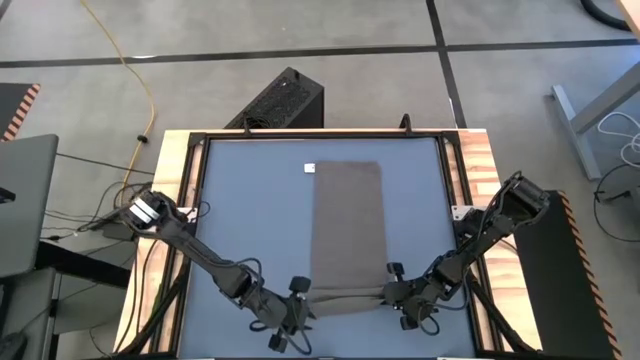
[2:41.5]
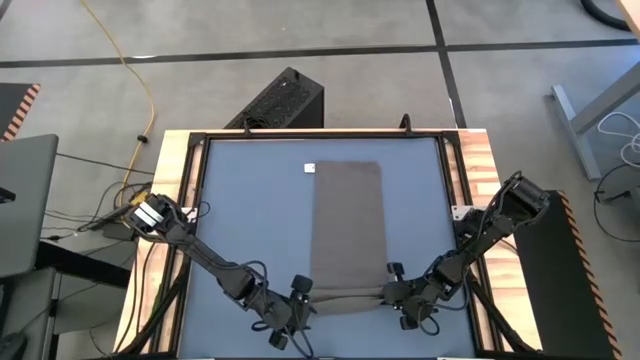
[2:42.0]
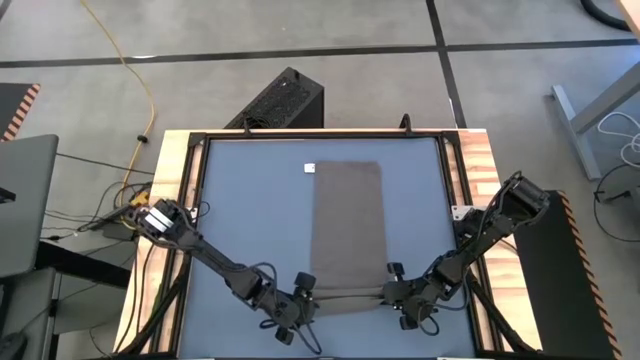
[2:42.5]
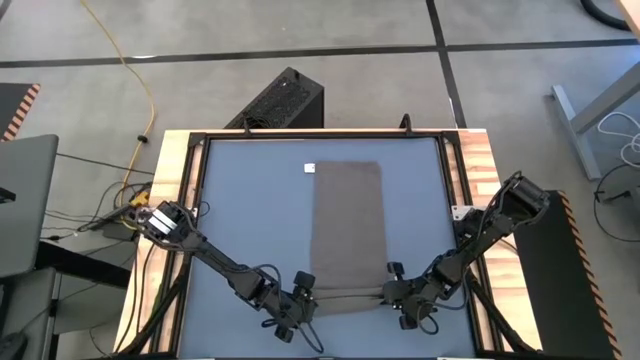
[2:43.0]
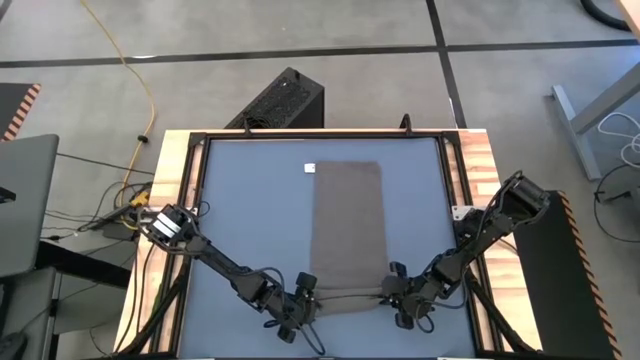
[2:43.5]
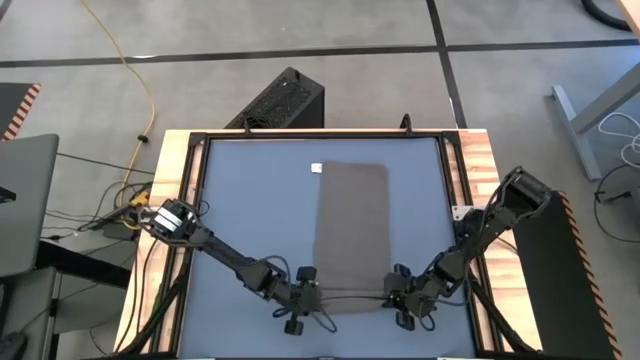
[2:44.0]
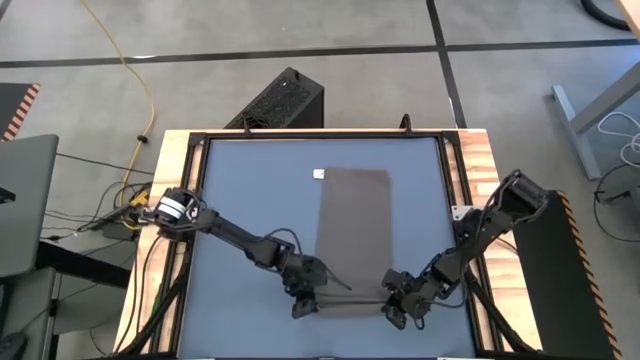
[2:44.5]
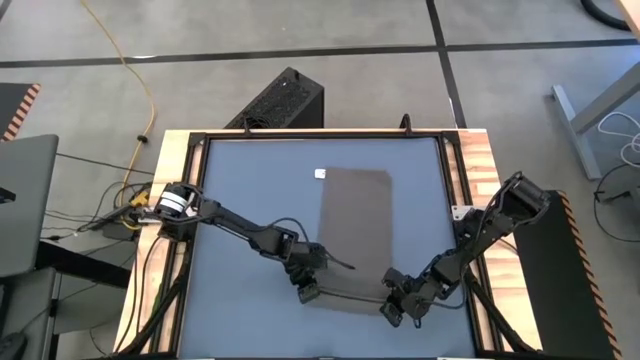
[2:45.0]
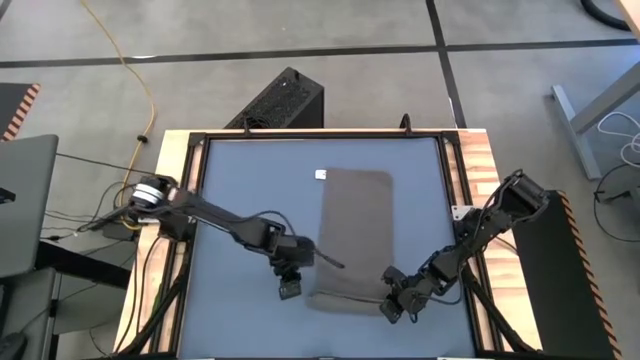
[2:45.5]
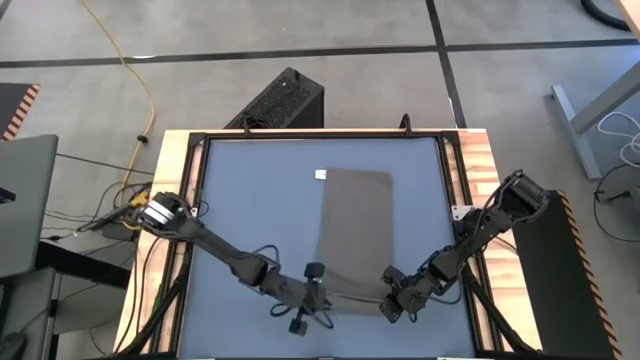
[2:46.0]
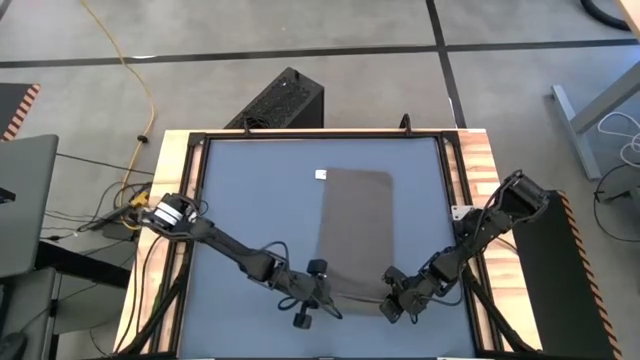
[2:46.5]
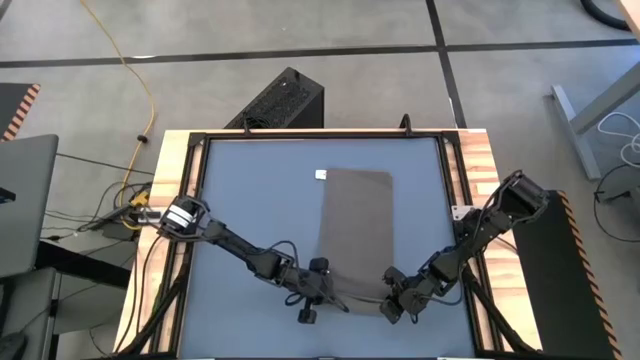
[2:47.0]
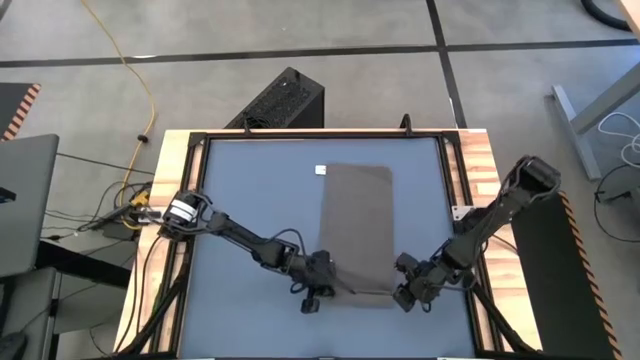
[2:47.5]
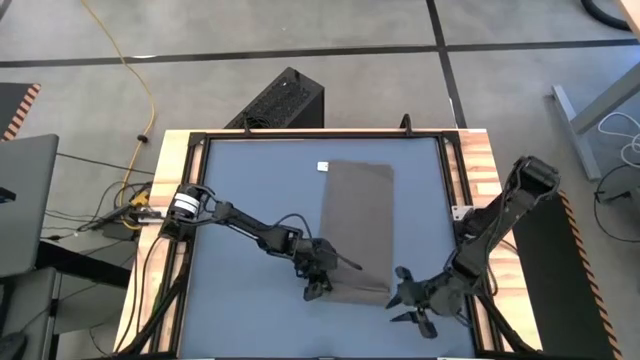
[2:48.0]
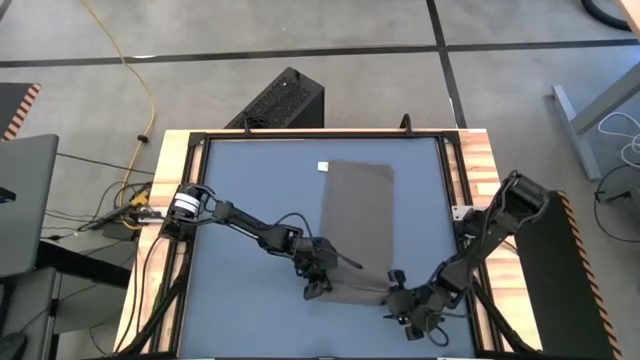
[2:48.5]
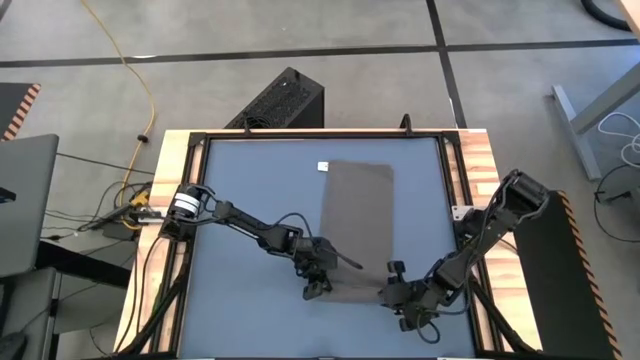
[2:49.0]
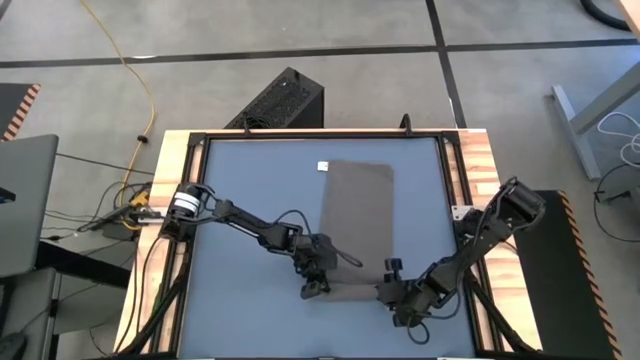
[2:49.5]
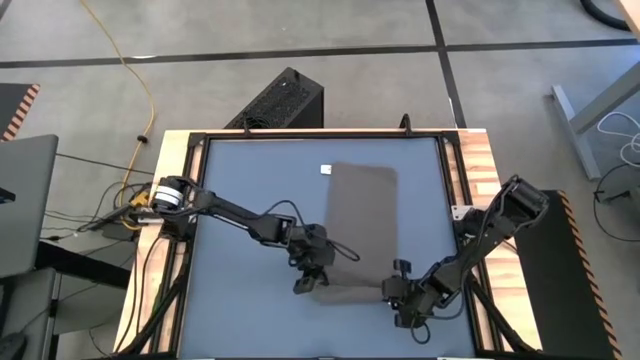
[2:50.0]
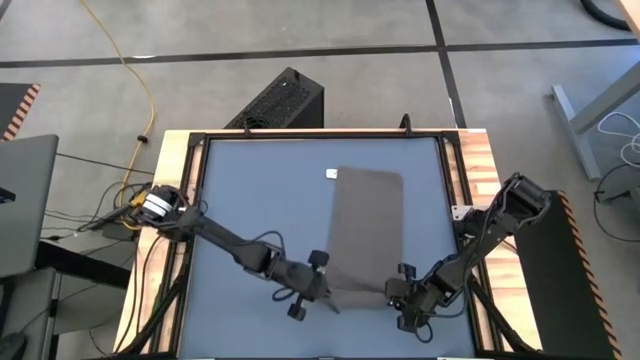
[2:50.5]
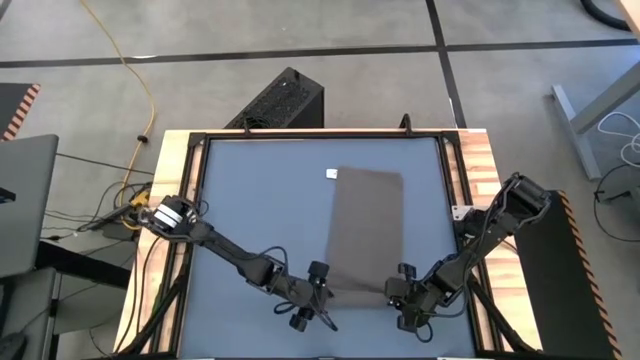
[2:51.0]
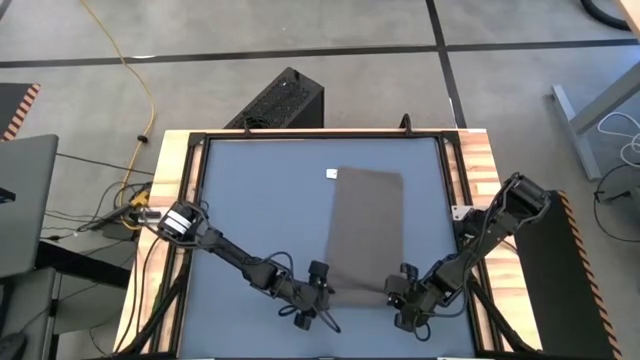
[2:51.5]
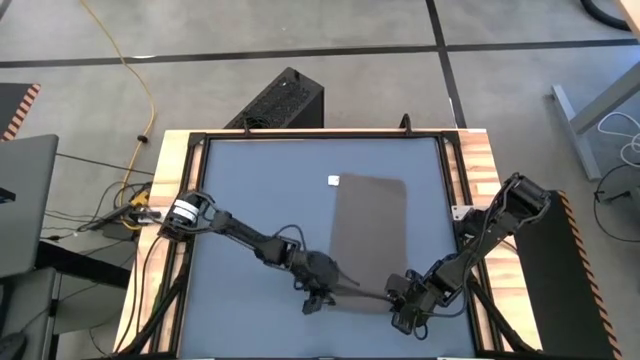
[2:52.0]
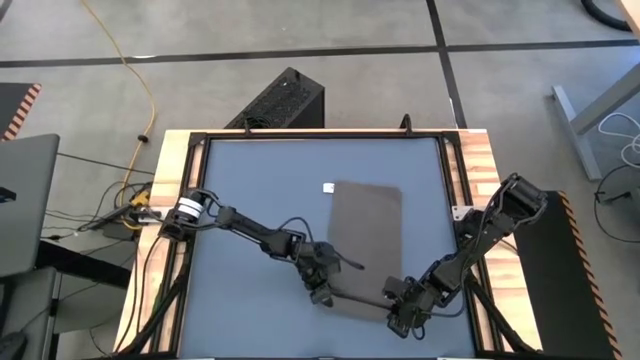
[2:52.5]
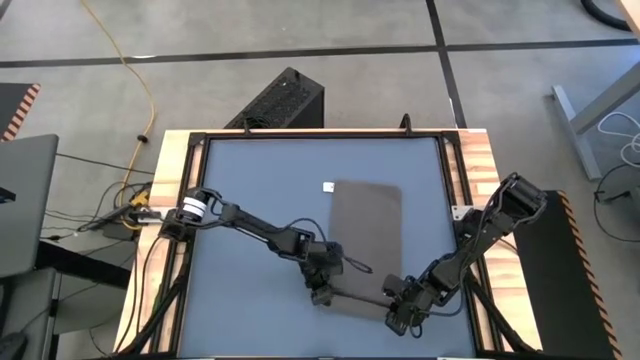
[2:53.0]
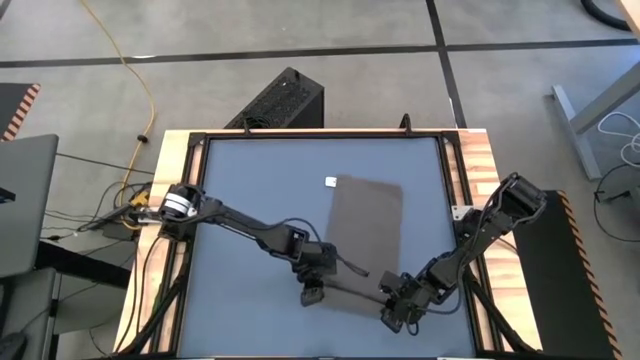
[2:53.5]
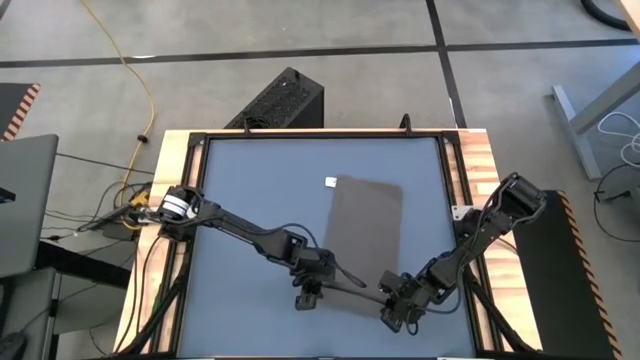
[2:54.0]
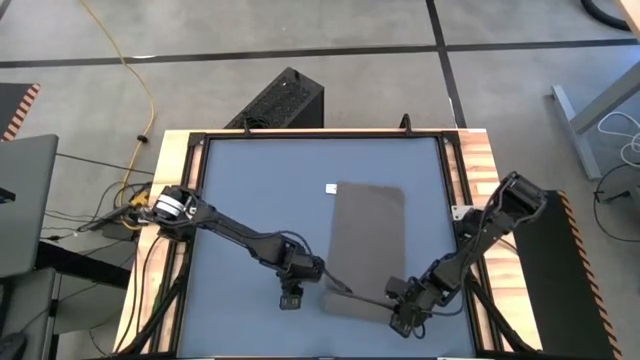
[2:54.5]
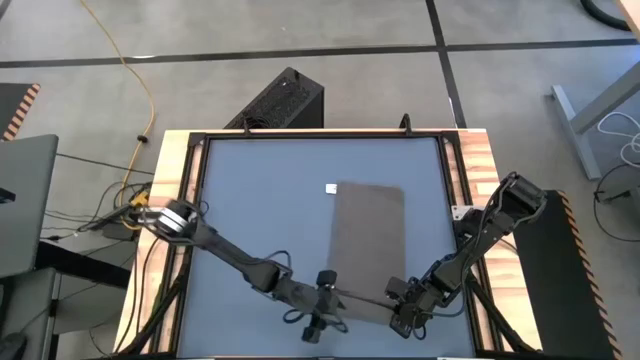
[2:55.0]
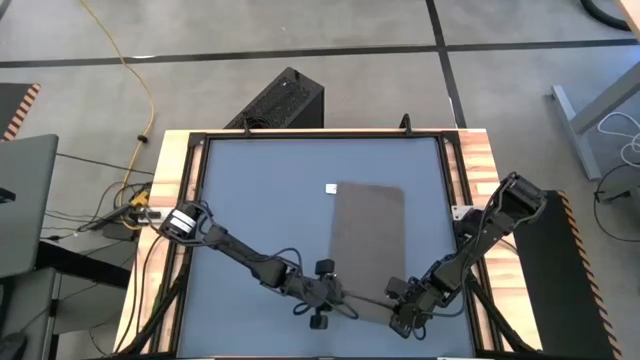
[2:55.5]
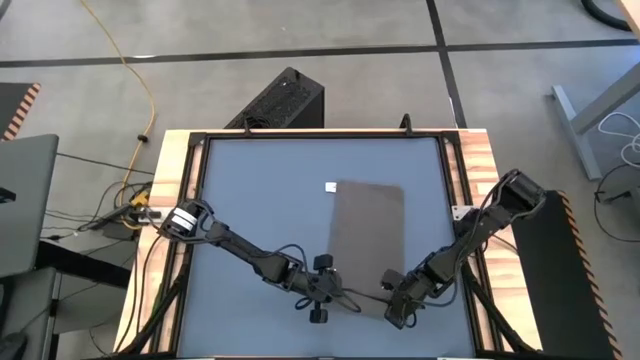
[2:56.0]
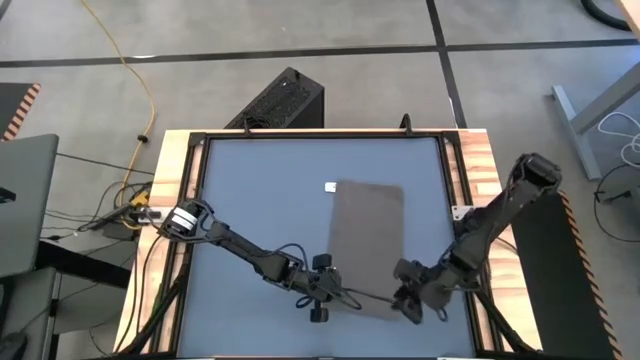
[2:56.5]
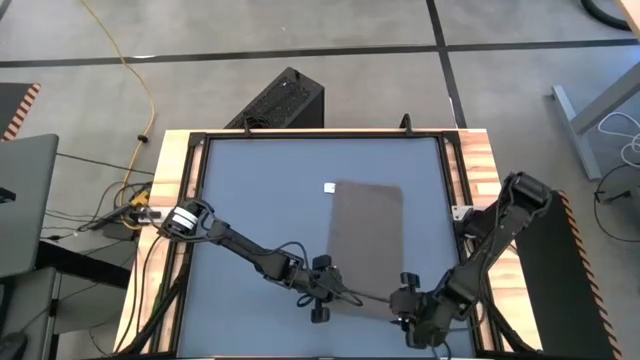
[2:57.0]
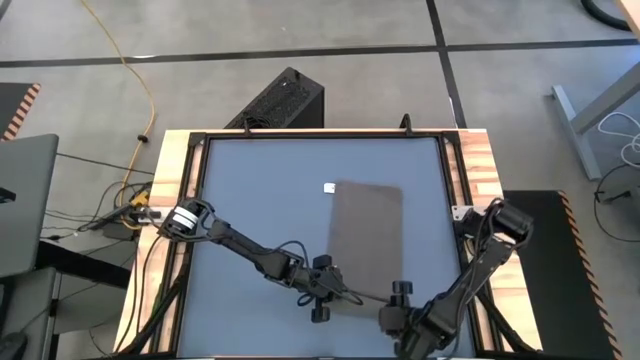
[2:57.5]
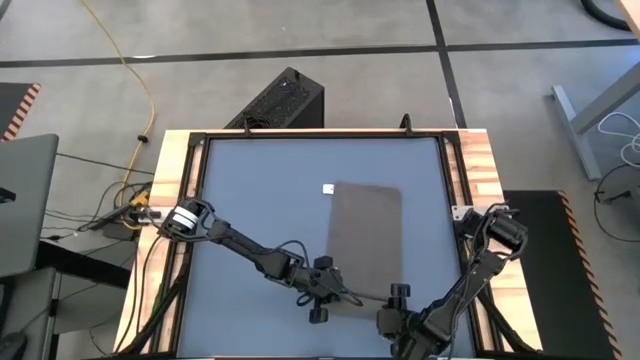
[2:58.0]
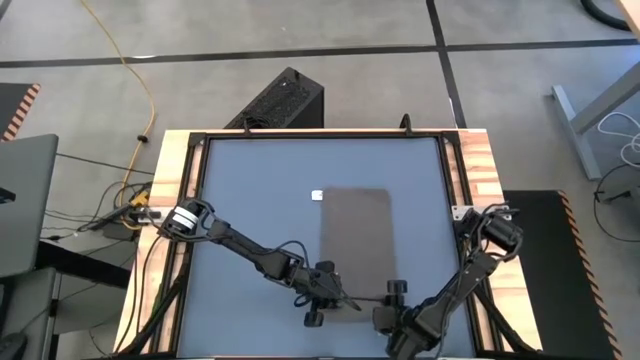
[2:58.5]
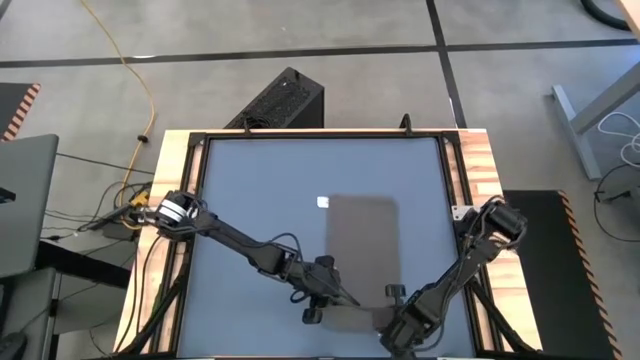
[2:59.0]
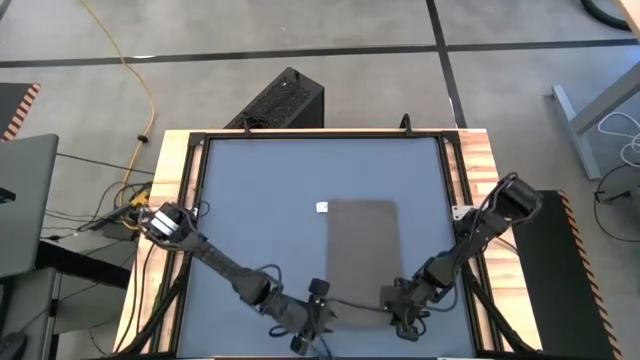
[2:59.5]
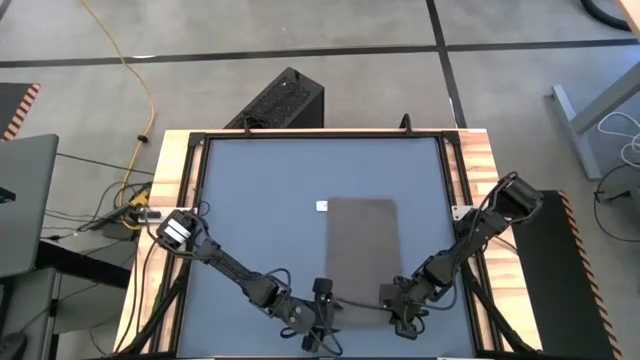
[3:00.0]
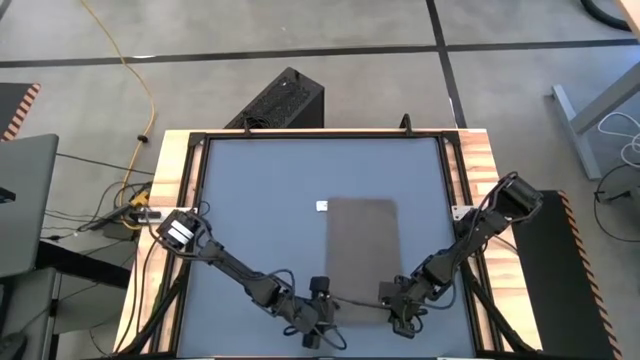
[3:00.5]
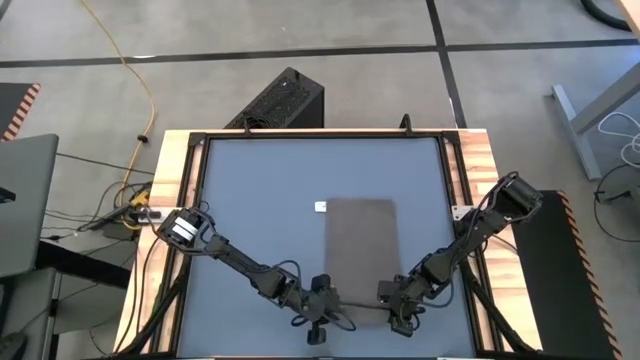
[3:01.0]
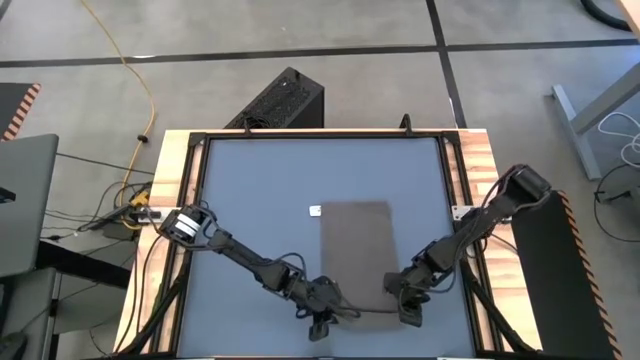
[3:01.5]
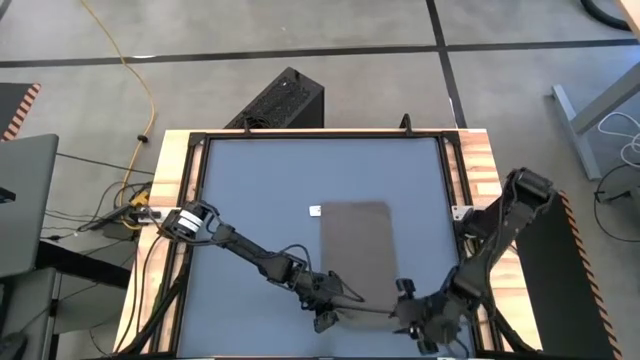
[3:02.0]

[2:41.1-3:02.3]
Task: Roll towel into tight, uniform cylinder
Roll the gray towel

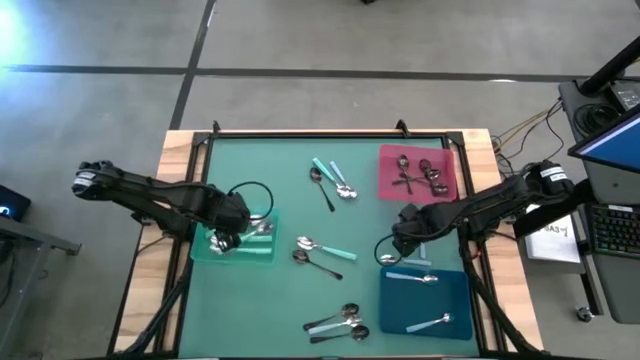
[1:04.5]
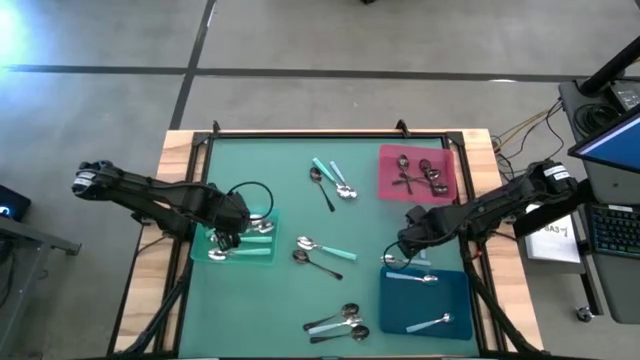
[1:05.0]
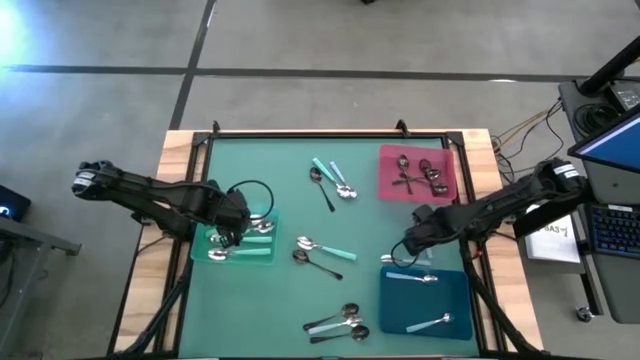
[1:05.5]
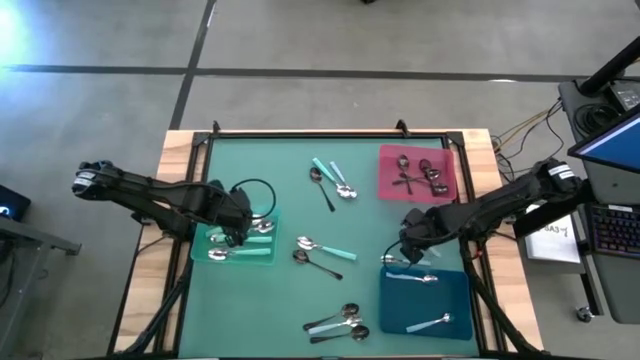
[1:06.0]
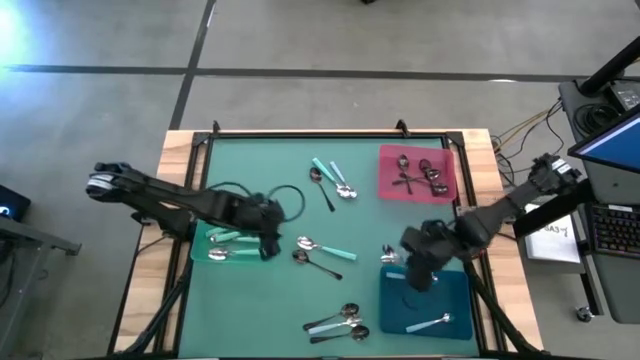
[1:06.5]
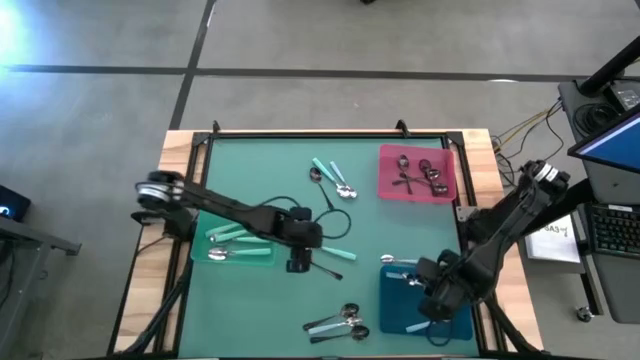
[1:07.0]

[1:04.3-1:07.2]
Task: Sort silverware by color (type)
Put the blue spoon into the blue bin
